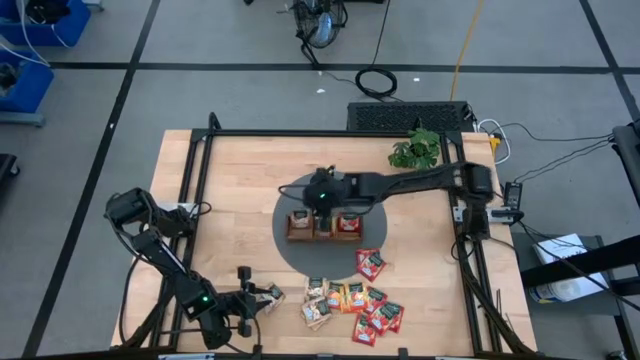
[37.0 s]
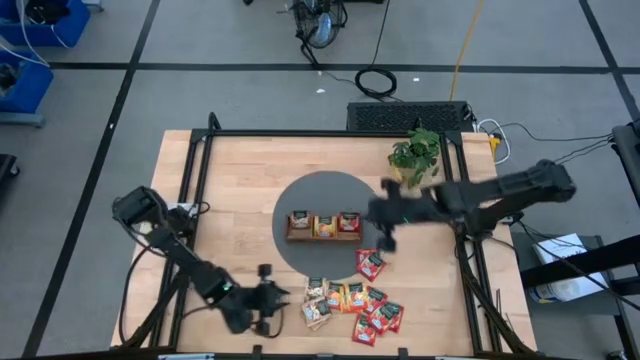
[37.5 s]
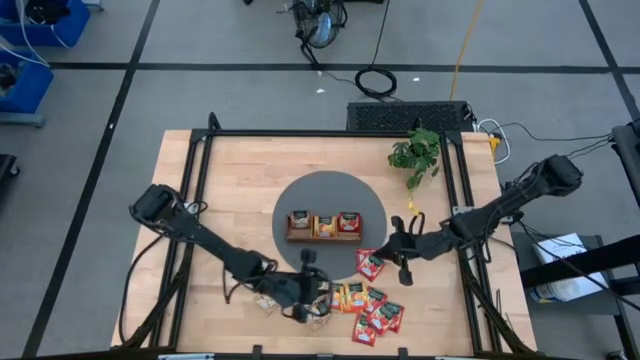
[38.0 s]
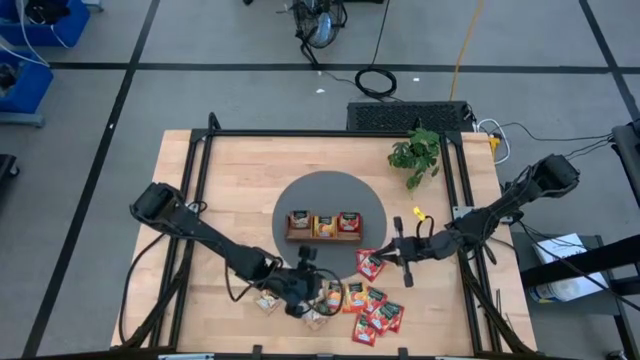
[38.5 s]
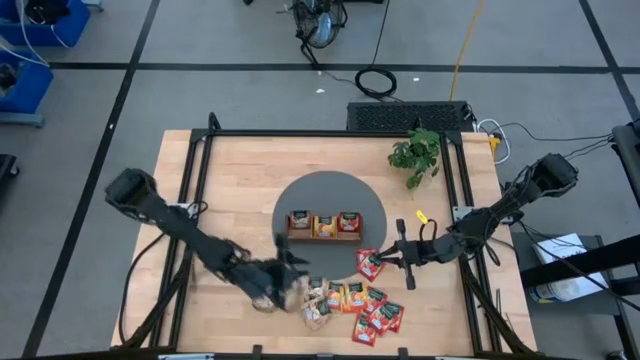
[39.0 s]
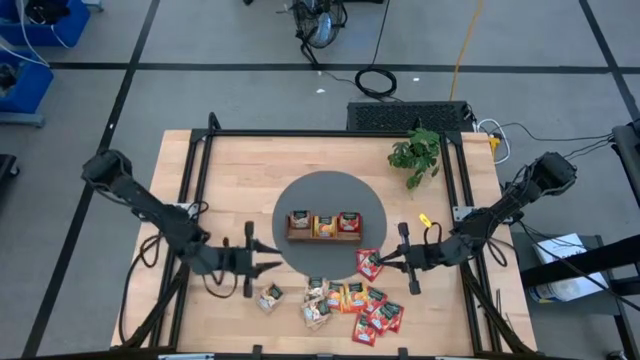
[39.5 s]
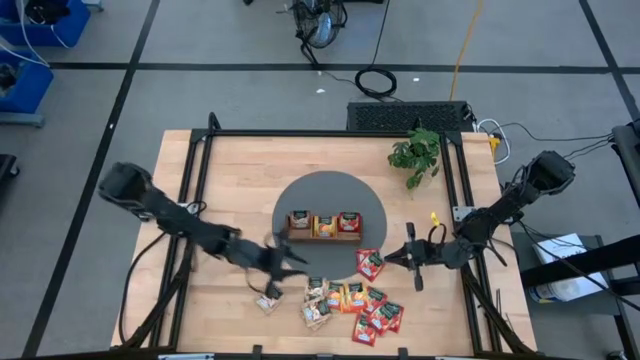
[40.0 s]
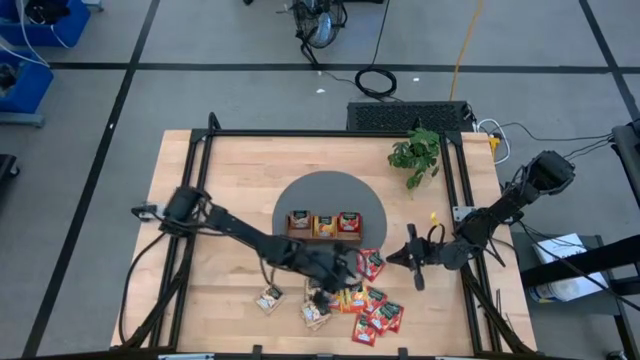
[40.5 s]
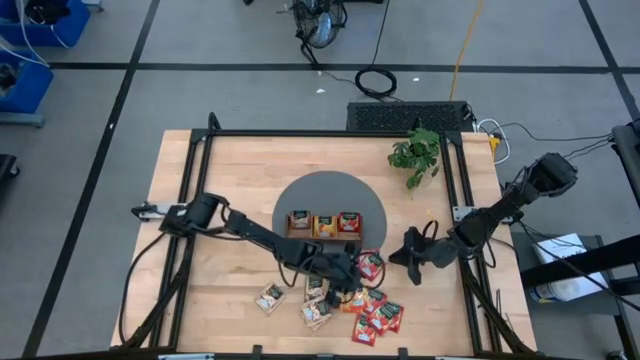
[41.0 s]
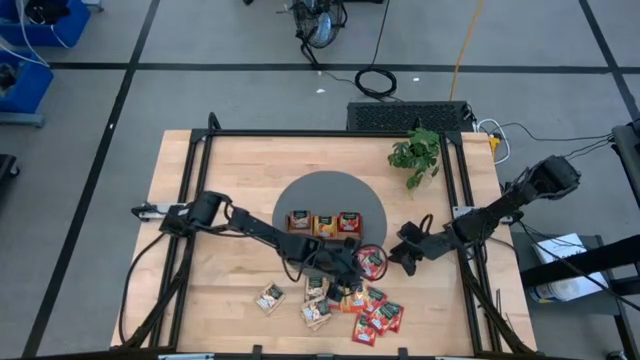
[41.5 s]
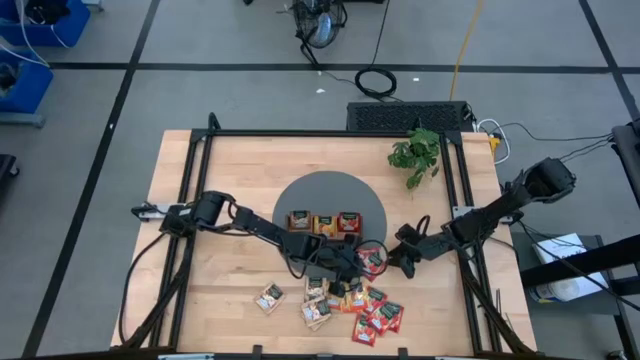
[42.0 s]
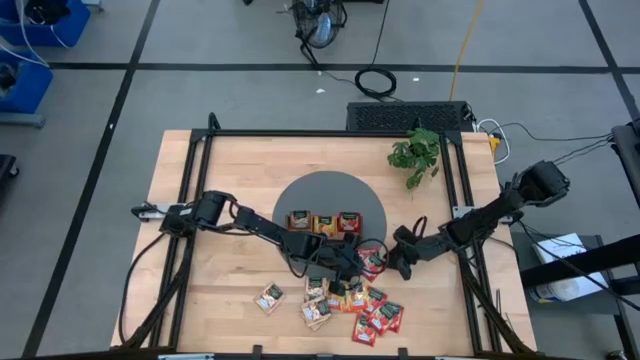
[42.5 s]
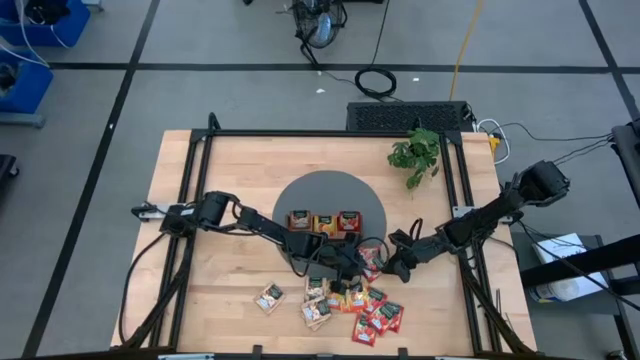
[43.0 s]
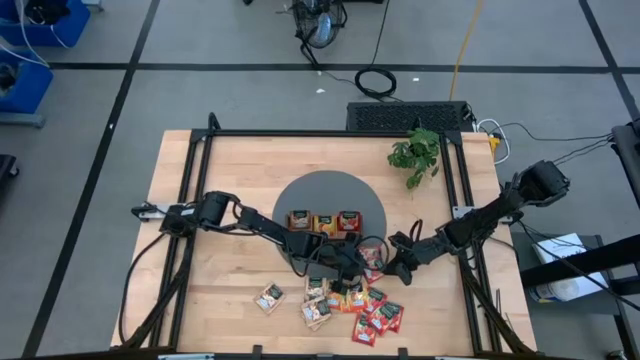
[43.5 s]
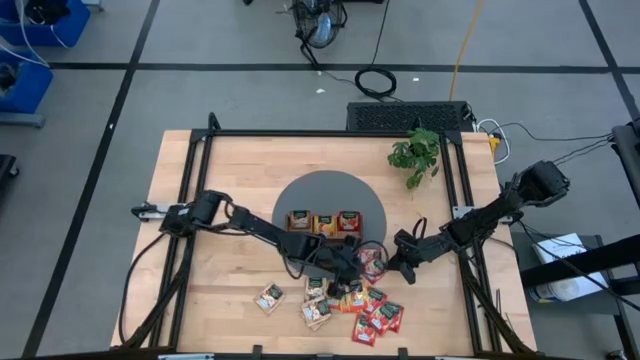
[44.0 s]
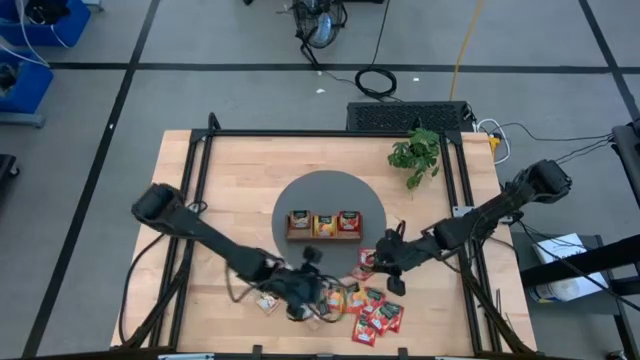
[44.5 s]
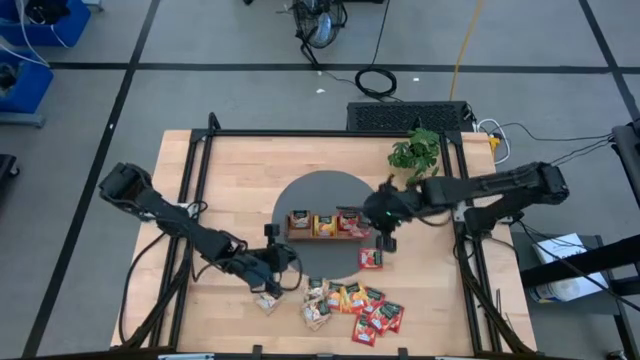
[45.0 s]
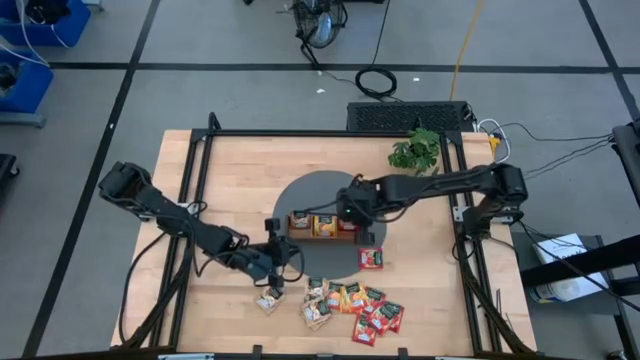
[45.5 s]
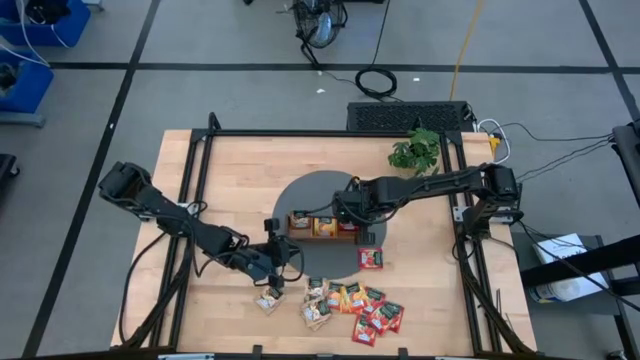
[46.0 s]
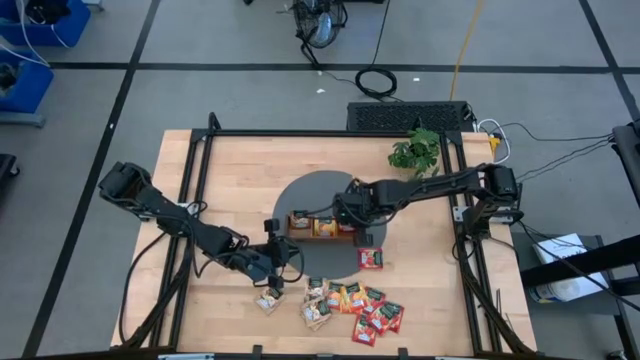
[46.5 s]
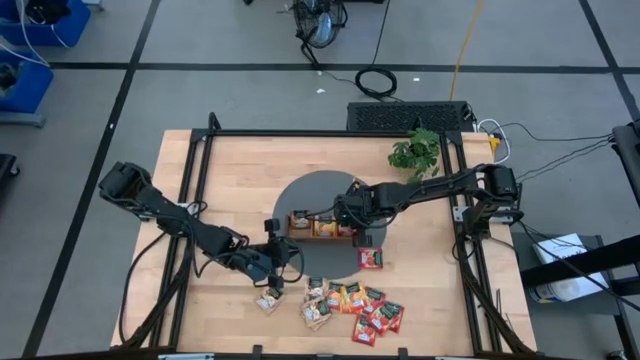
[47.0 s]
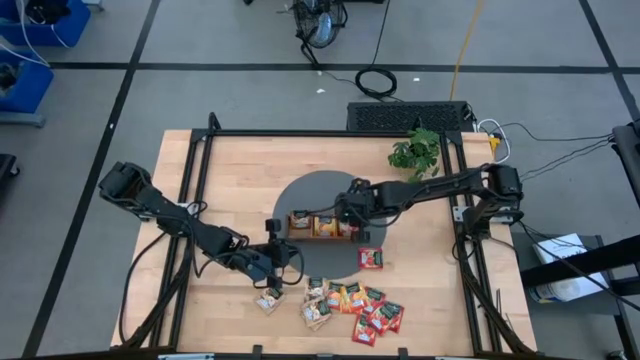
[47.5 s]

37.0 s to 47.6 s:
Task: Pick & Place Tea
Put the red tea bag into the right section of the wooden organizer

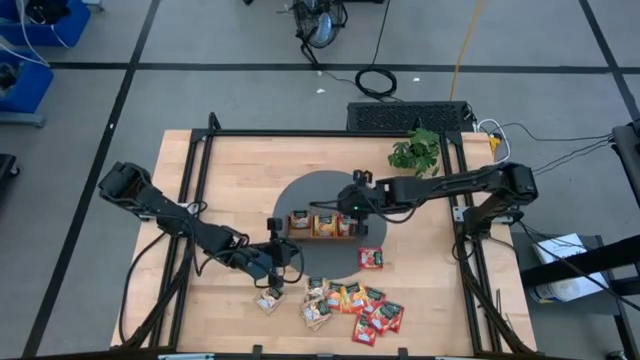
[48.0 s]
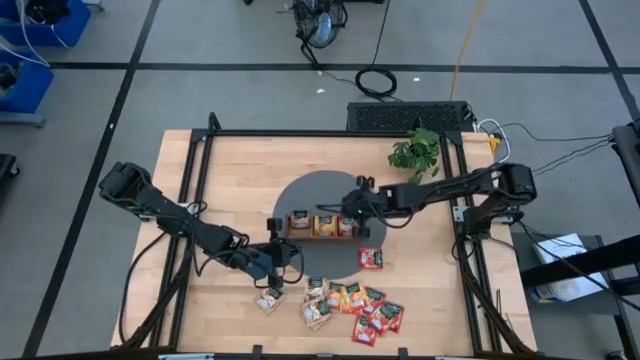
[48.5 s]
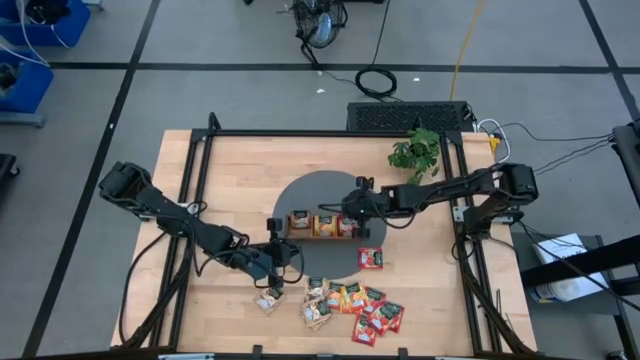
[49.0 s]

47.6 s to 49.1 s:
Adjust the red tea bag in the right section of the wooden organizer

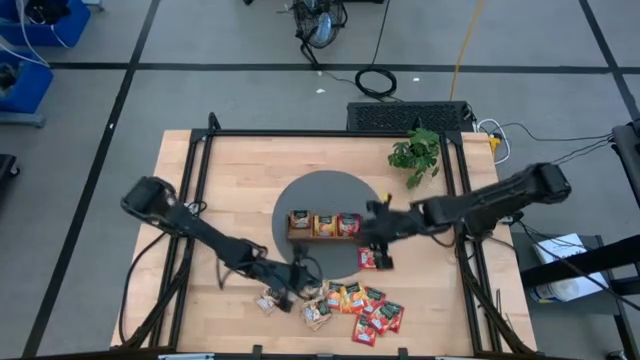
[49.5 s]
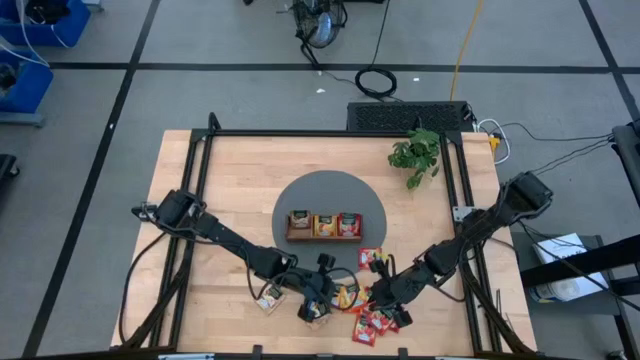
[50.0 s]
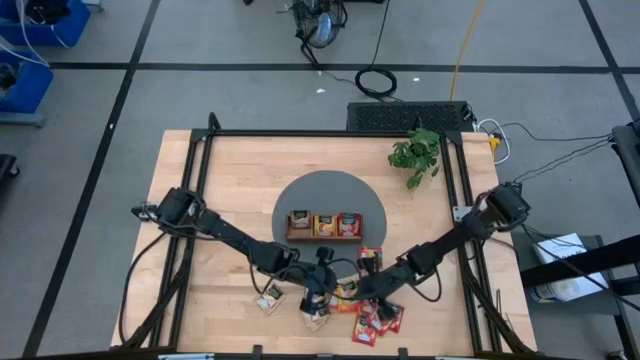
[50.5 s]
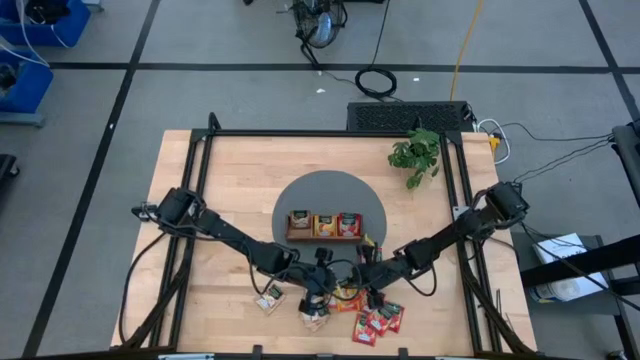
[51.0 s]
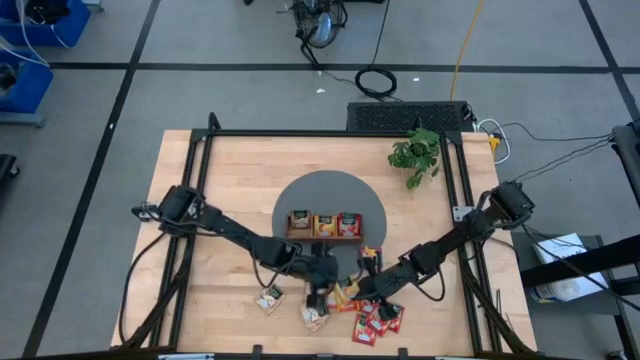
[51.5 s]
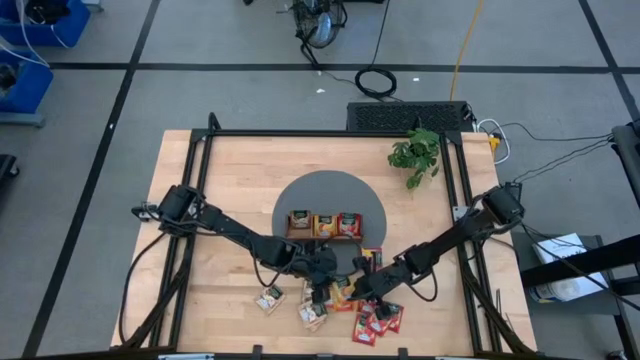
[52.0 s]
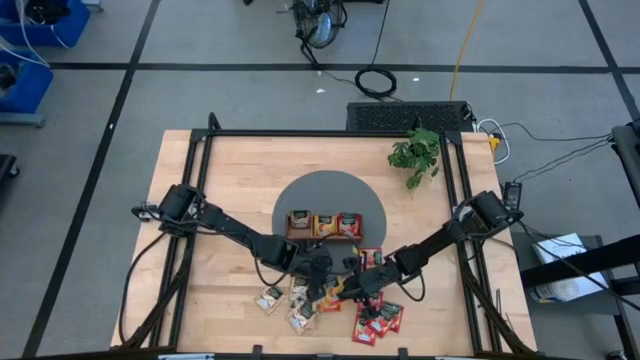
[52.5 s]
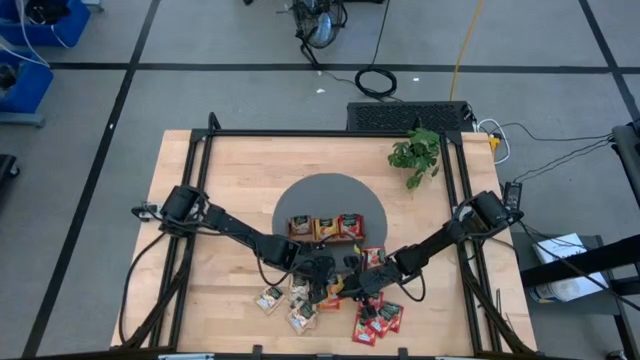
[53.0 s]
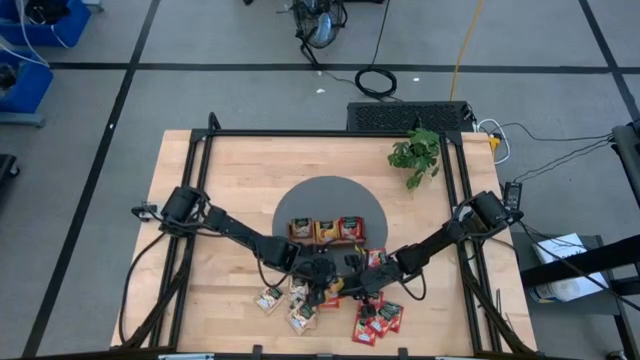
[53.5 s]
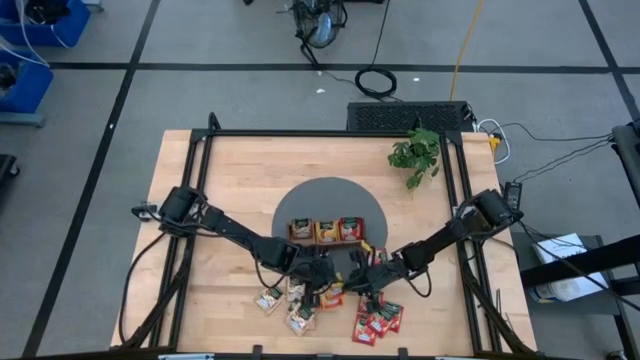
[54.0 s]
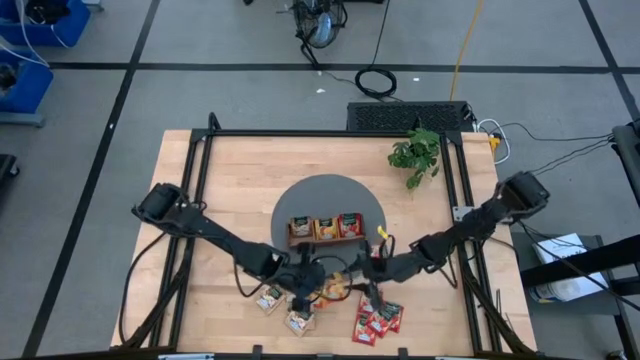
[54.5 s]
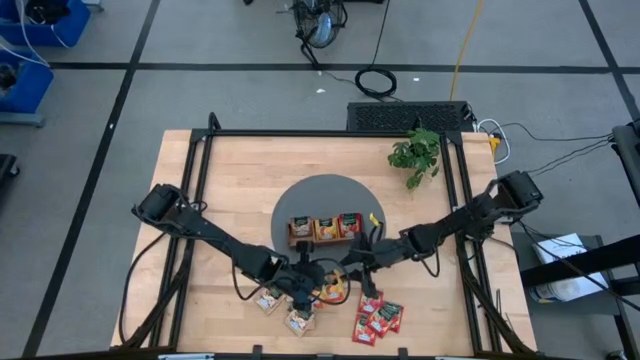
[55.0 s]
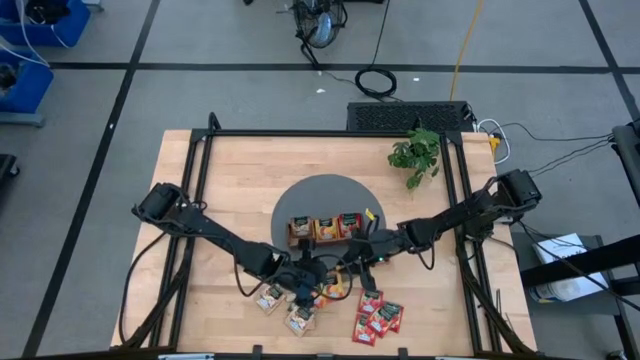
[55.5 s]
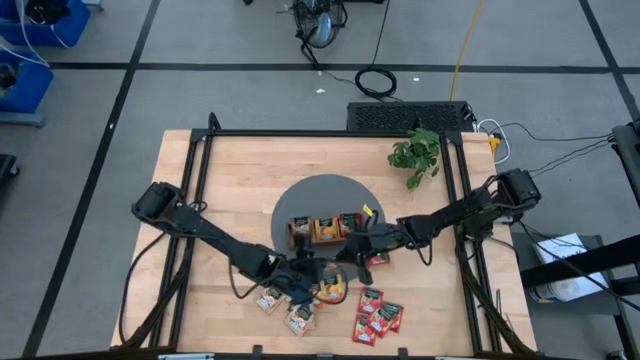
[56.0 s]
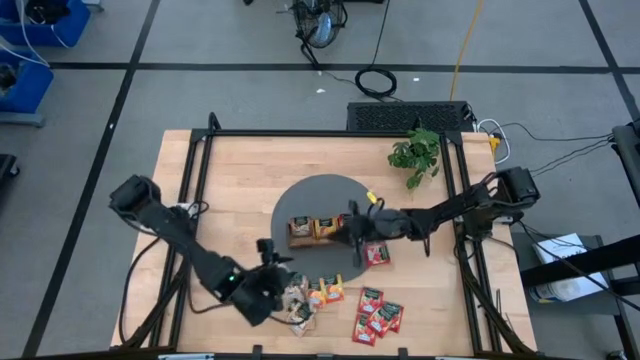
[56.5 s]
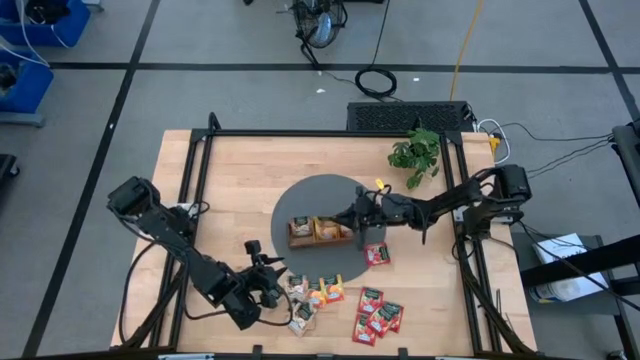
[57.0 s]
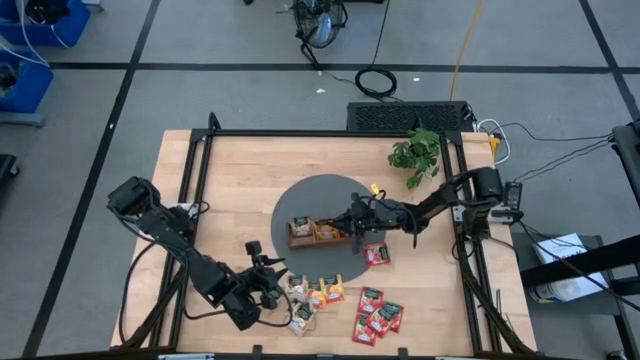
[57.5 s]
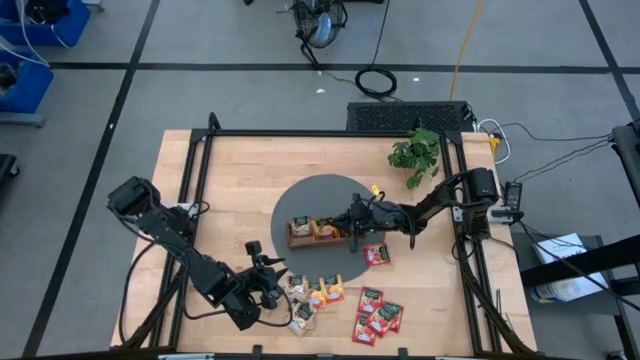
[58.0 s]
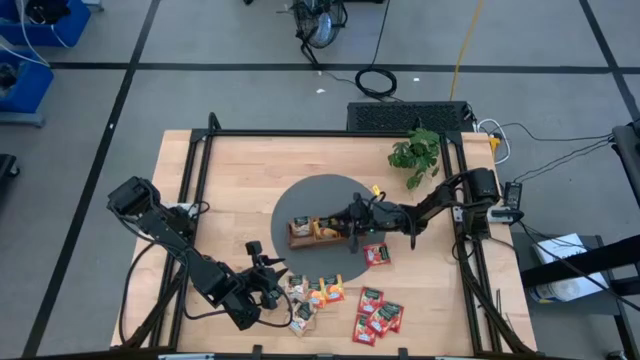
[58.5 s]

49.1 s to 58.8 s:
Put the yellow tea bag into the middle section of the wooden organizer
